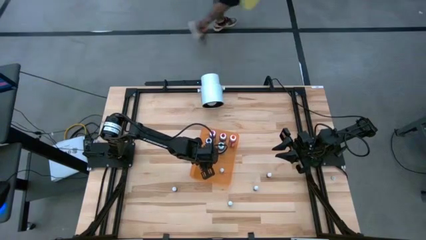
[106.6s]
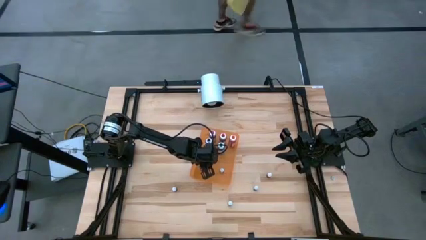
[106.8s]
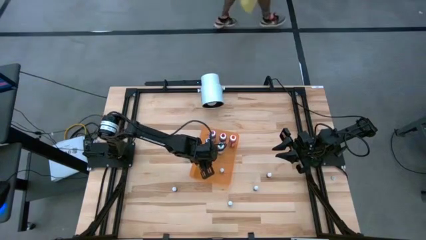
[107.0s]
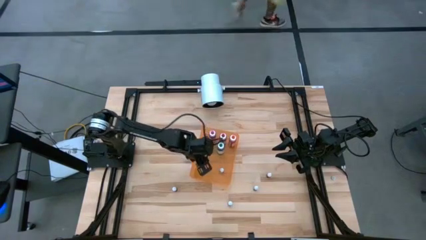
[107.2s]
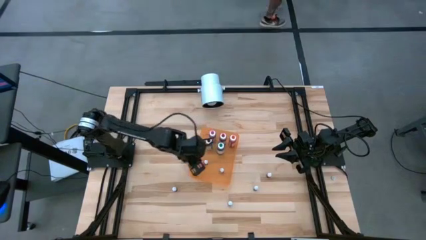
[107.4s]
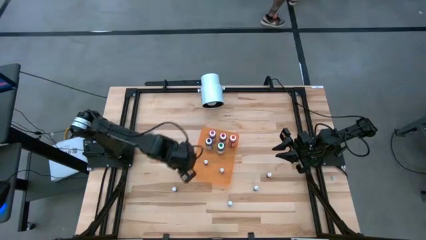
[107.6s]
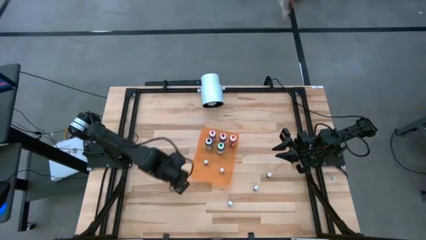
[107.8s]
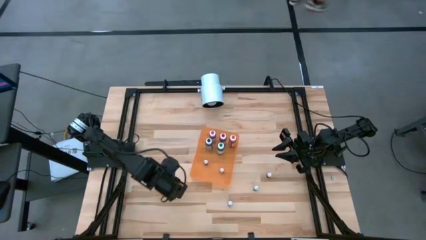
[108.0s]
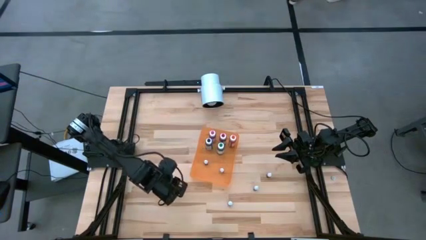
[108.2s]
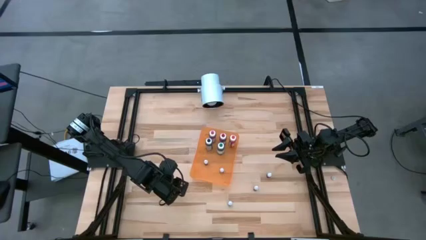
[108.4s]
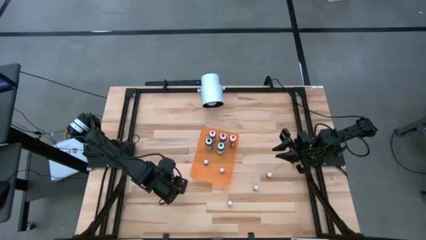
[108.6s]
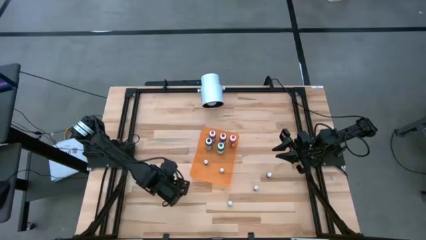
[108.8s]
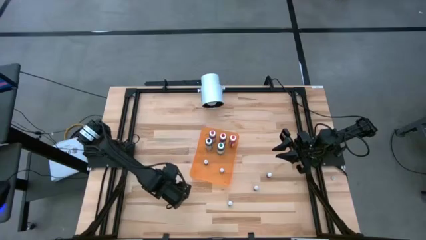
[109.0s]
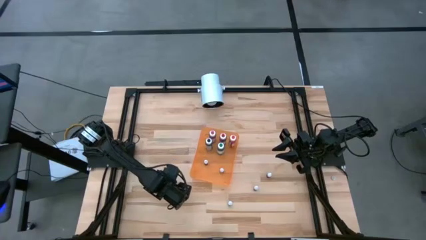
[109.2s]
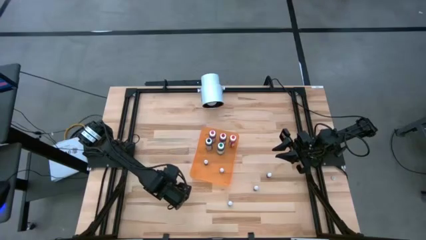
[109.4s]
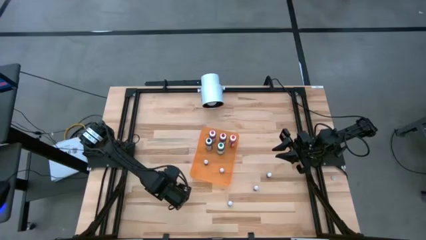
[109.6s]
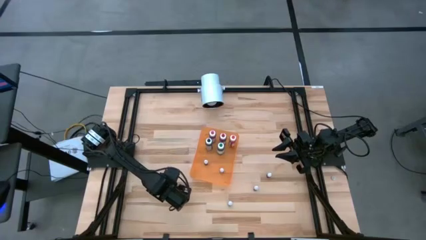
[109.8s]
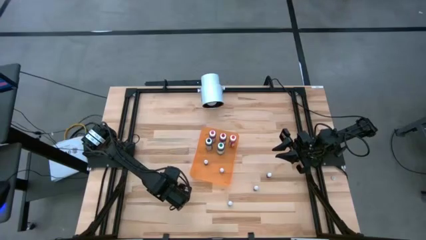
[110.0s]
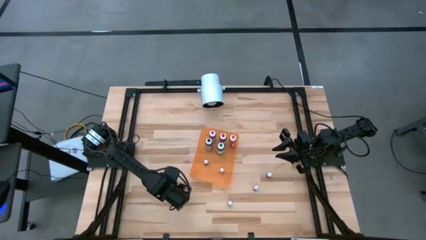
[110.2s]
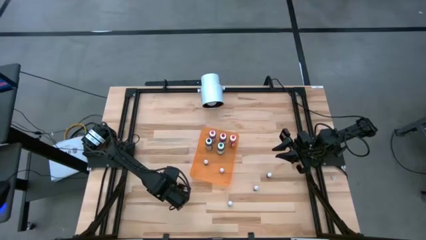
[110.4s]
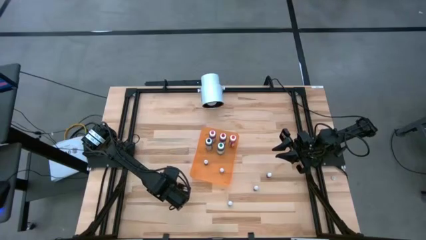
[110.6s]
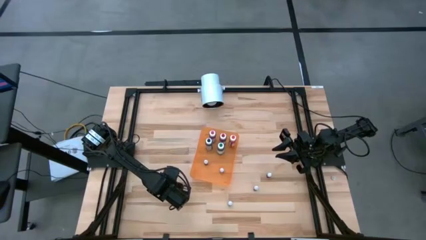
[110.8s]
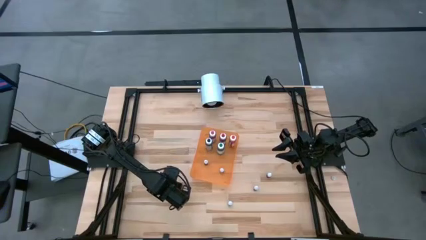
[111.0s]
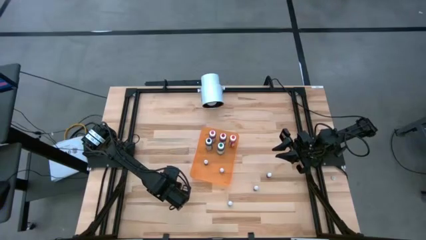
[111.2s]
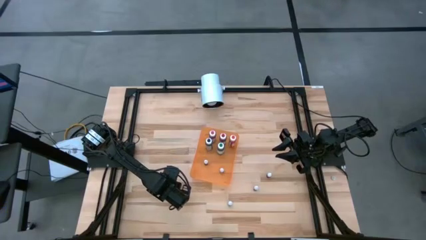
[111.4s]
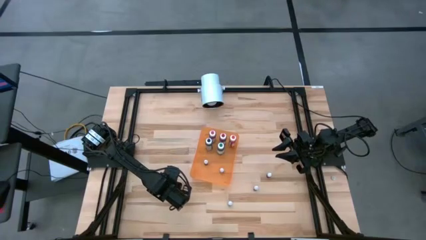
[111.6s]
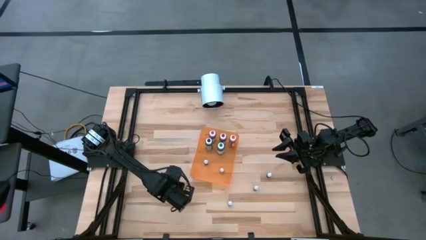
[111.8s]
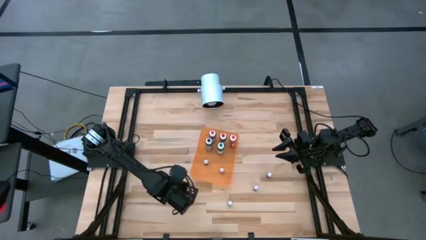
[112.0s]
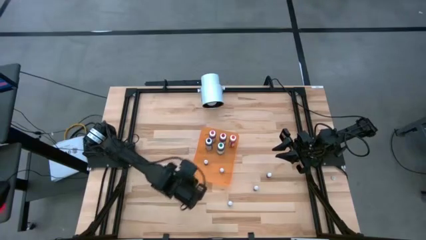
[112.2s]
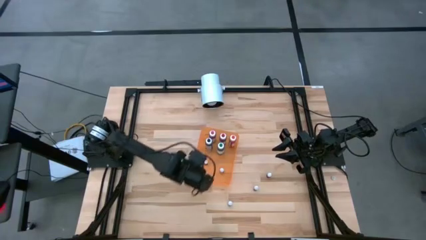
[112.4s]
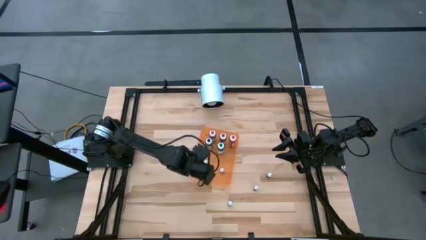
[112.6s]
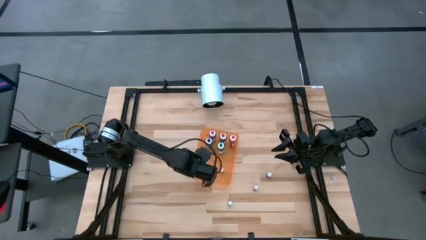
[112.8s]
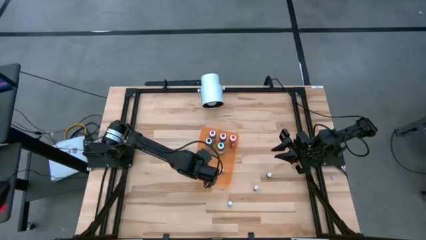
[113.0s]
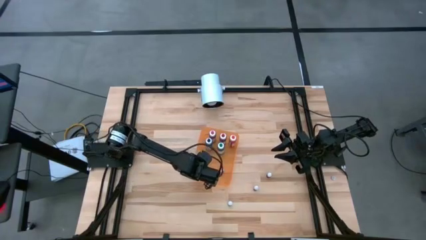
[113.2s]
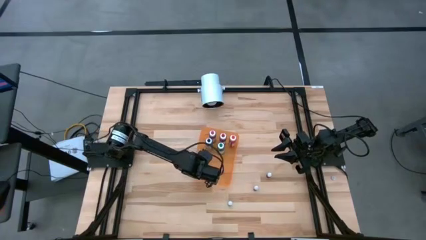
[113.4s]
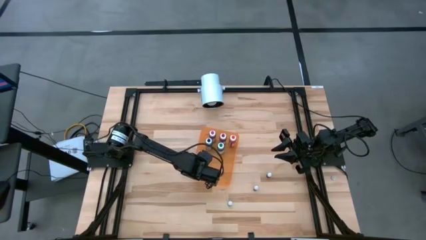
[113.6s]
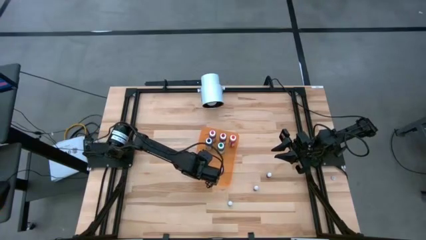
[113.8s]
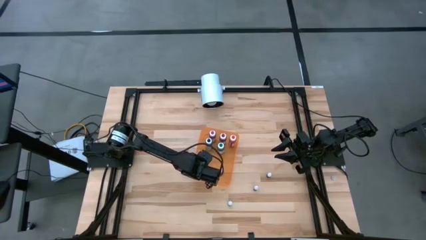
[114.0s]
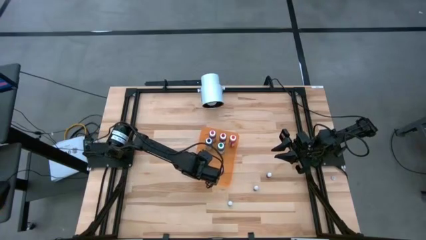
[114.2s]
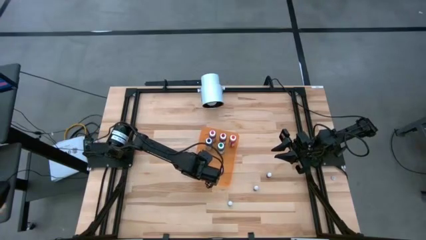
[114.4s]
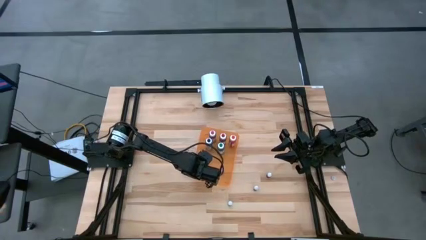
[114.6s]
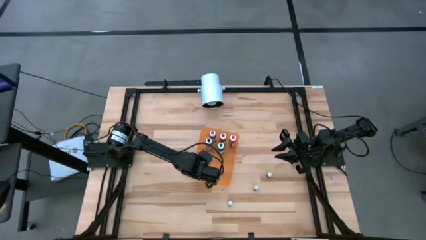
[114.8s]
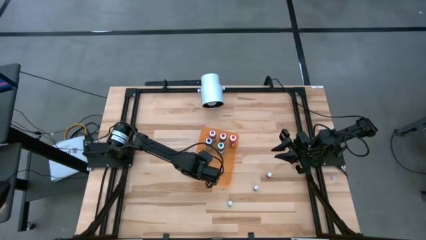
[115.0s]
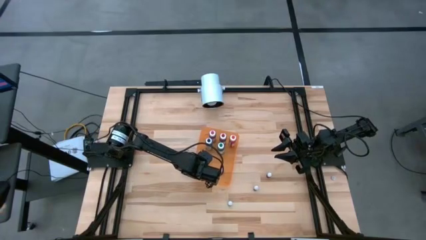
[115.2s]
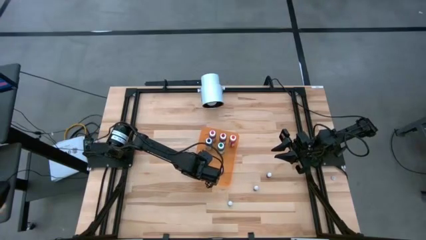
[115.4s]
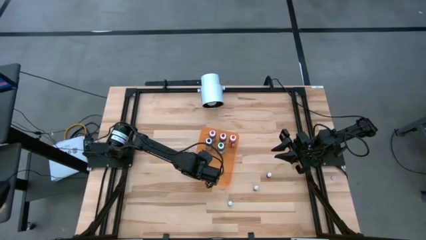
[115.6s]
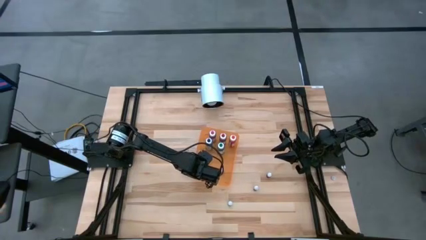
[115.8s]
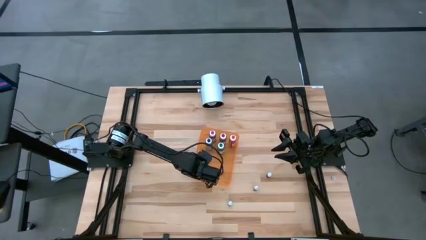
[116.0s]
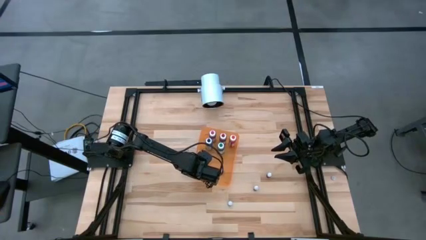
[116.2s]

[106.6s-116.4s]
Task: Pick & Place food coloring
Put the small black food coloring bottle into the orange bin

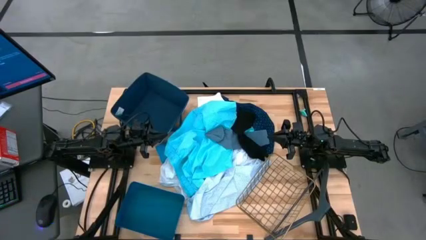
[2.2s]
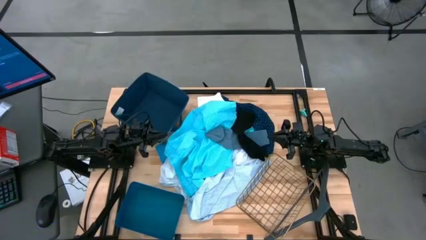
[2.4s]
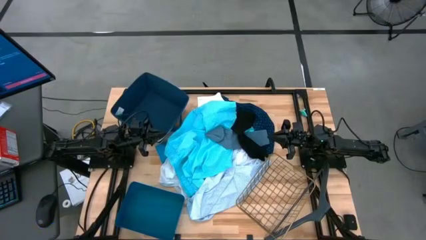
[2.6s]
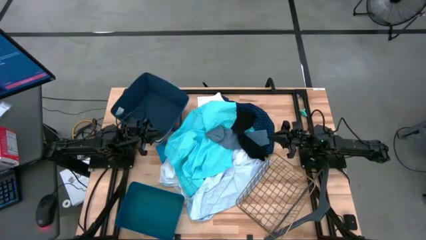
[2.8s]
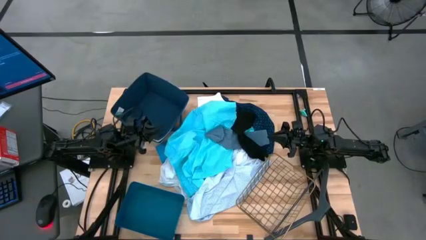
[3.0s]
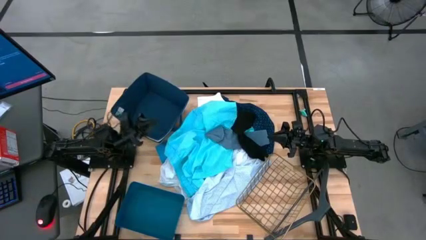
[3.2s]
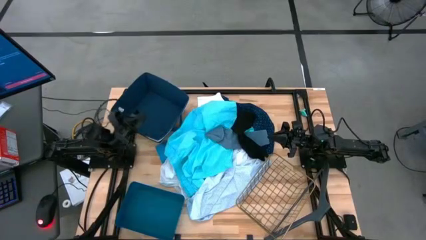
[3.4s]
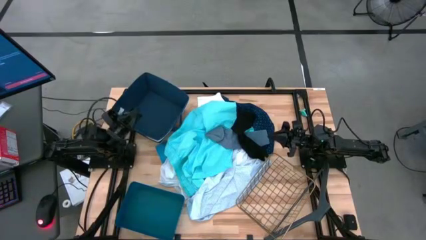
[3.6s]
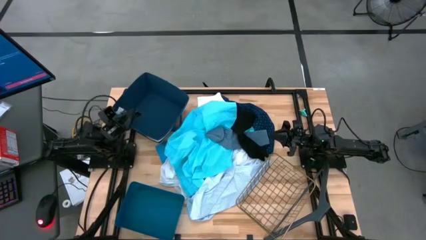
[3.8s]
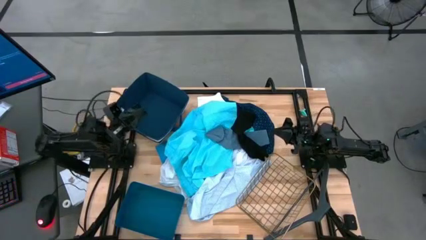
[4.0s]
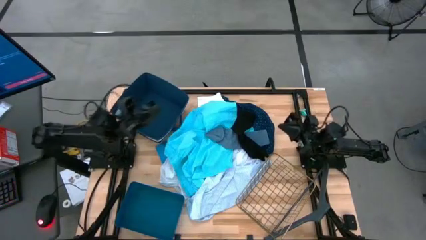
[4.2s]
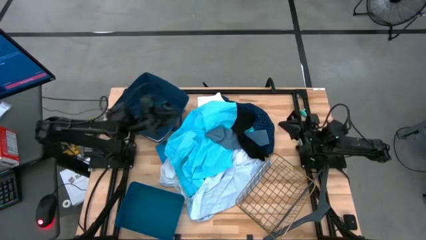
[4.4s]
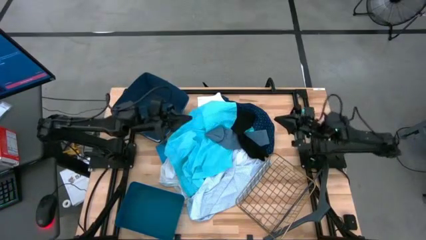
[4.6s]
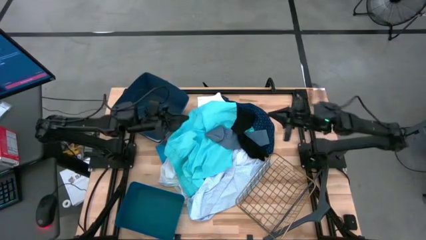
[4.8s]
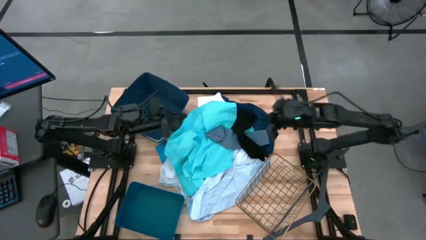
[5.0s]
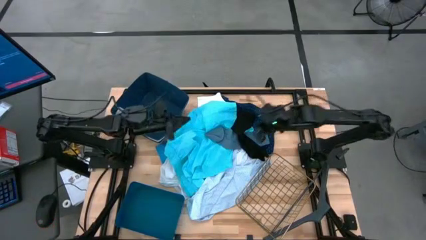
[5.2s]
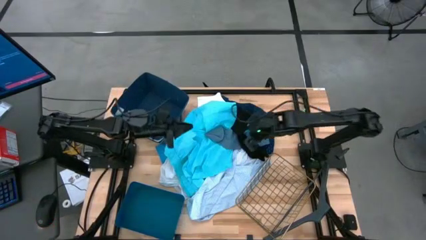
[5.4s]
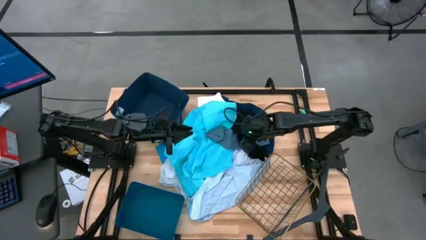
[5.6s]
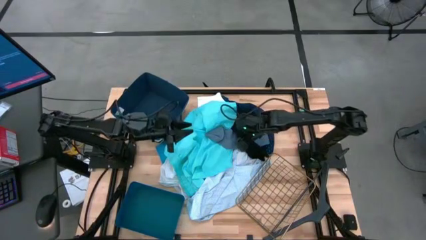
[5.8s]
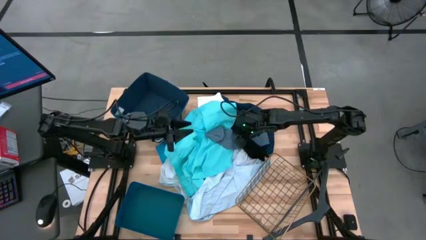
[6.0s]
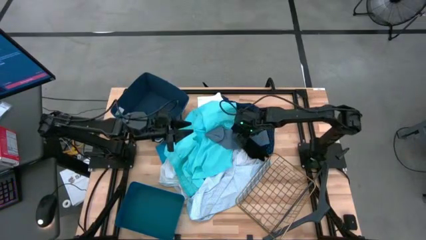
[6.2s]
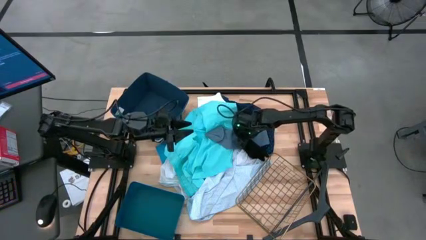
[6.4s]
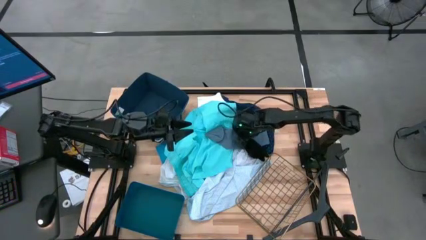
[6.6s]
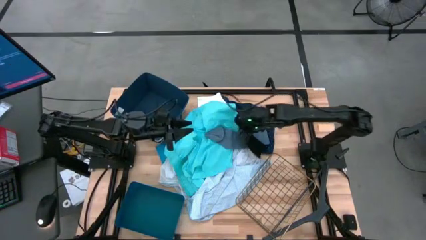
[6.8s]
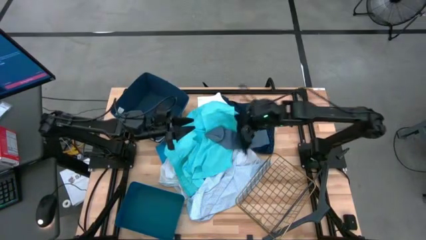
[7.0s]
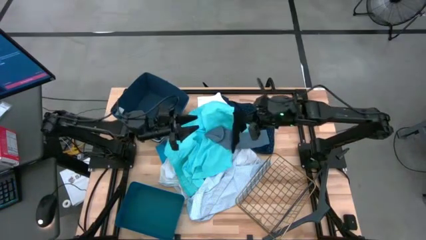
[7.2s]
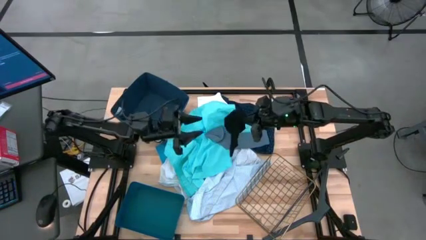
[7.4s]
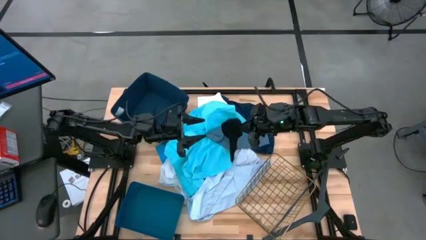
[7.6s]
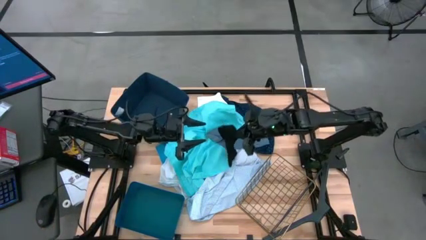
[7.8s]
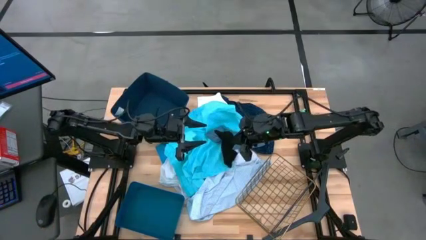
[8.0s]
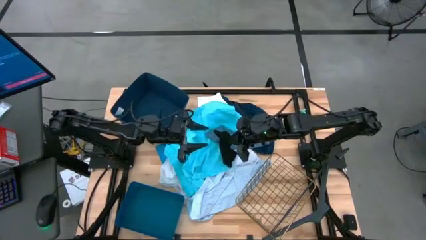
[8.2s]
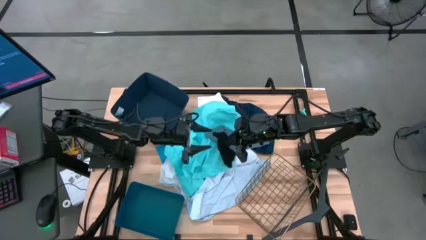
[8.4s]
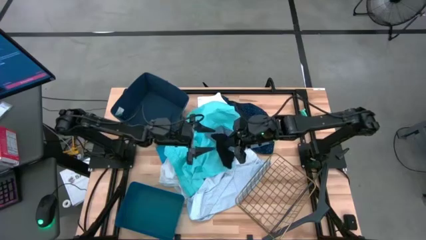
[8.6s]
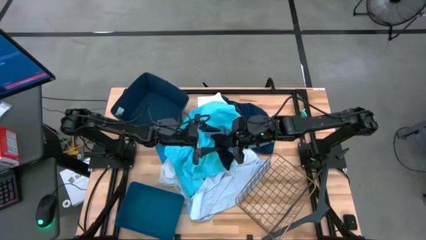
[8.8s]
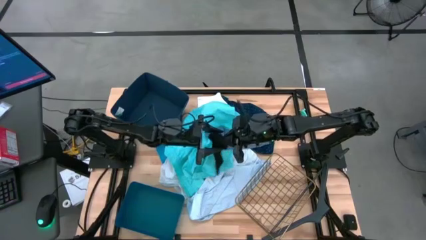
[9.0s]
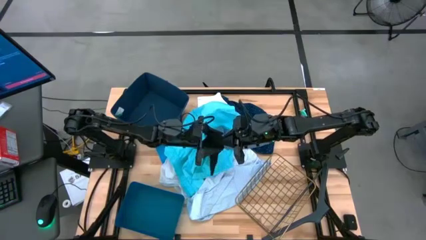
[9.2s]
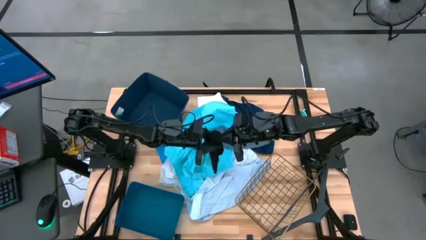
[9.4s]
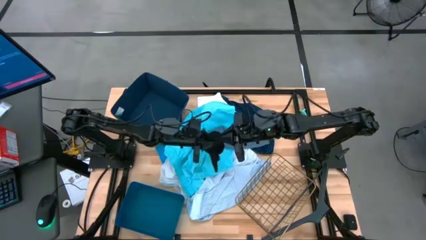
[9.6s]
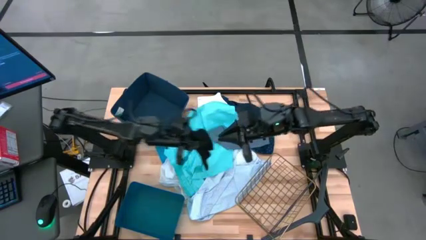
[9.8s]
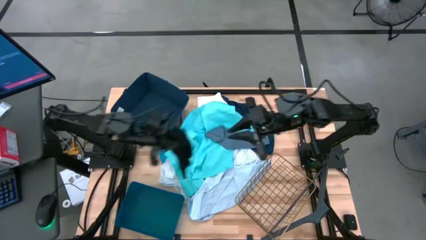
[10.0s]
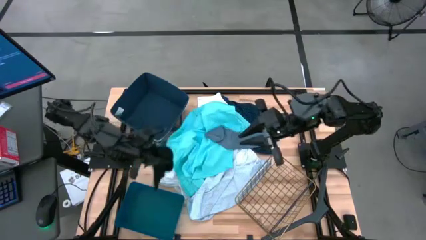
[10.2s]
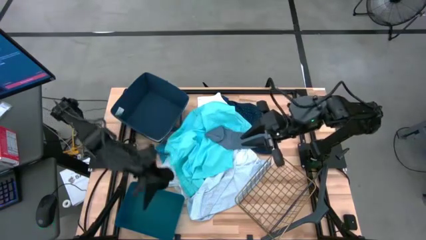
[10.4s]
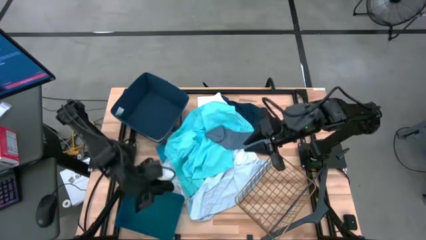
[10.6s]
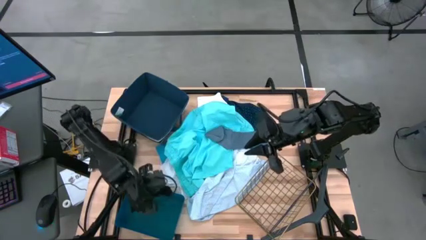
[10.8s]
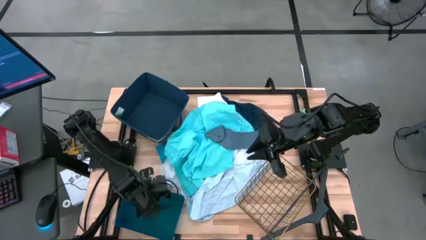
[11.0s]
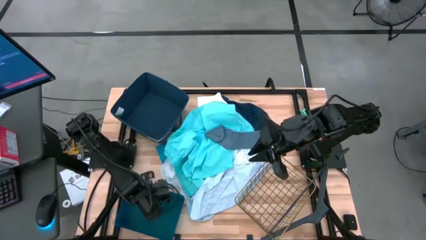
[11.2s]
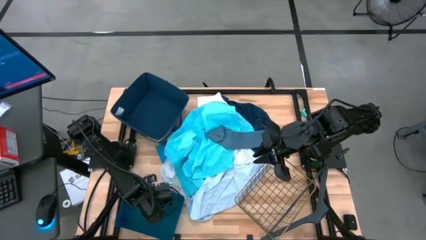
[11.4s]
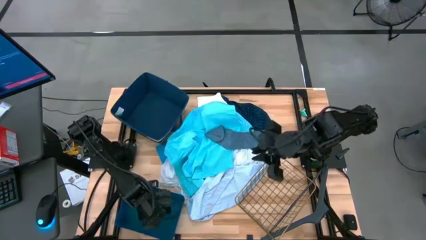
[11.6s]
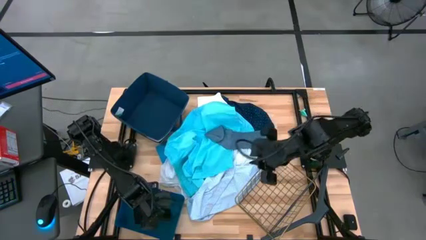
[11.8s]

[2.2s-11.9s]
Task: Pick & Place Cloths
Put the black sock into the blue bin
